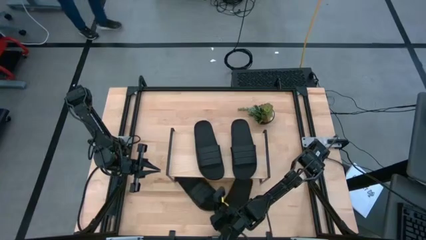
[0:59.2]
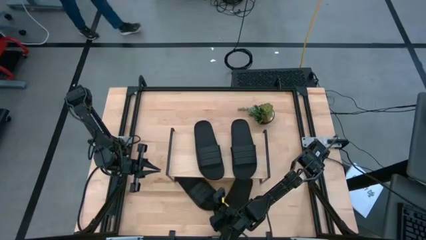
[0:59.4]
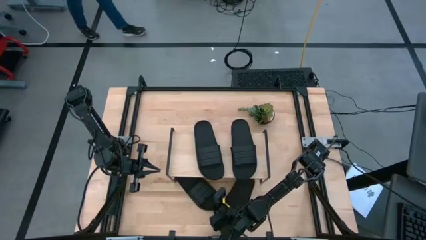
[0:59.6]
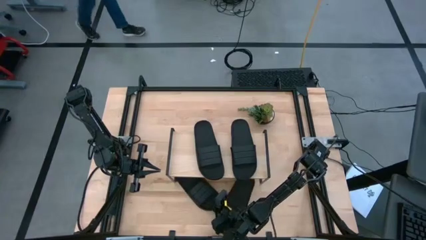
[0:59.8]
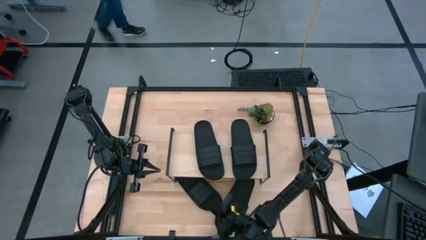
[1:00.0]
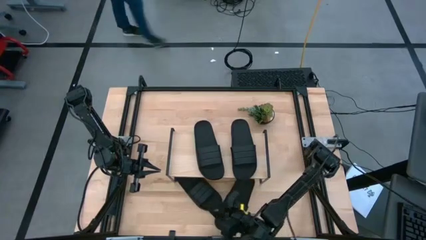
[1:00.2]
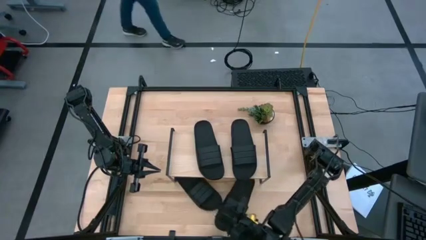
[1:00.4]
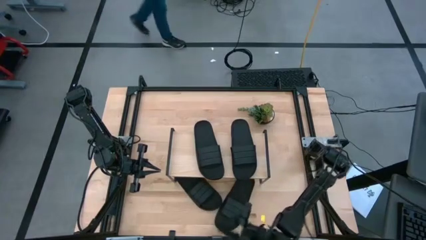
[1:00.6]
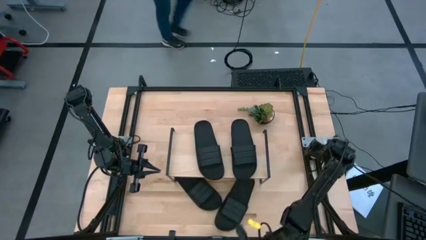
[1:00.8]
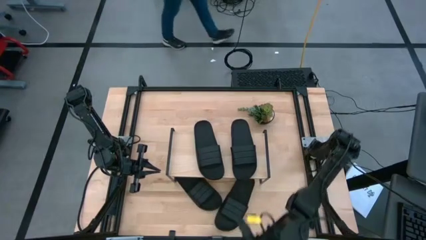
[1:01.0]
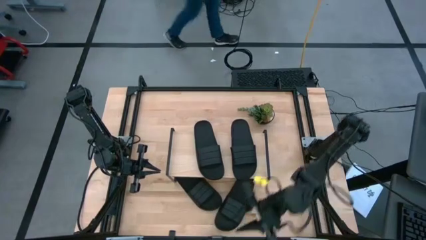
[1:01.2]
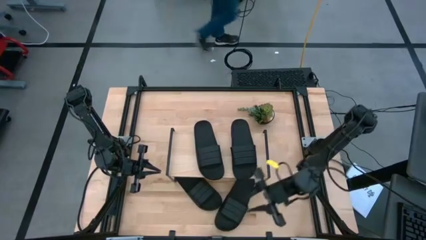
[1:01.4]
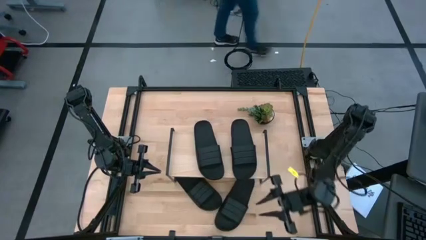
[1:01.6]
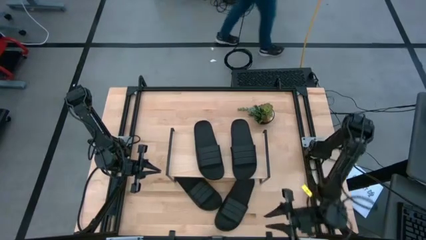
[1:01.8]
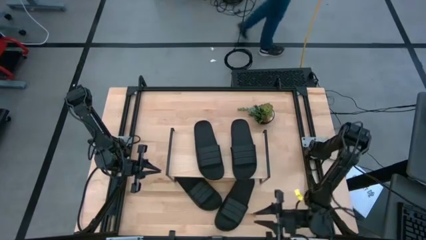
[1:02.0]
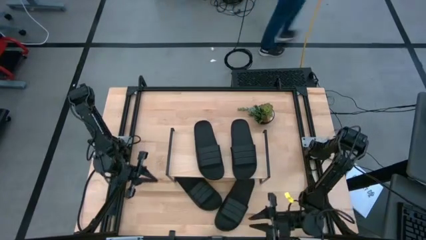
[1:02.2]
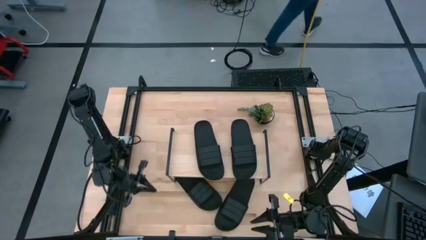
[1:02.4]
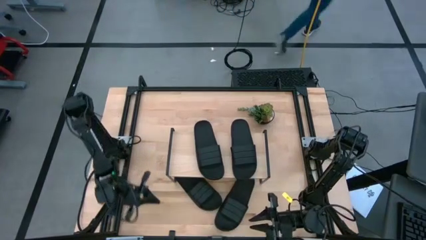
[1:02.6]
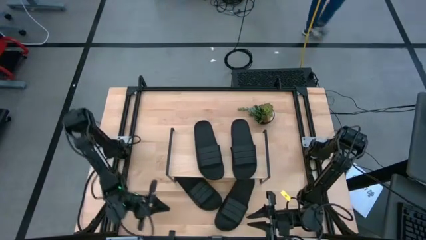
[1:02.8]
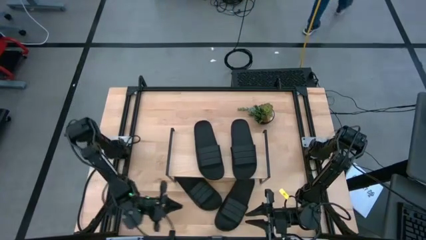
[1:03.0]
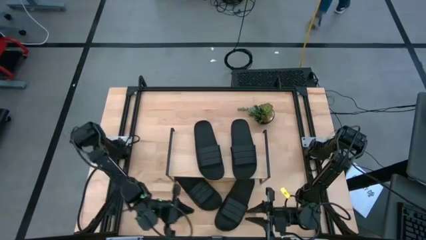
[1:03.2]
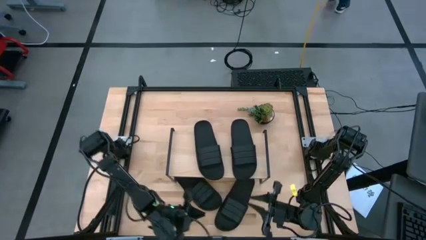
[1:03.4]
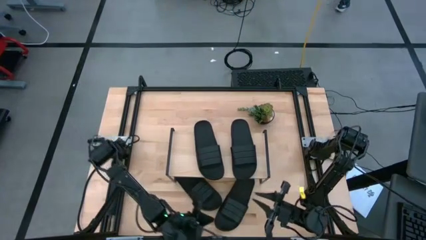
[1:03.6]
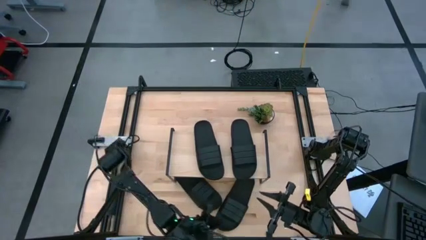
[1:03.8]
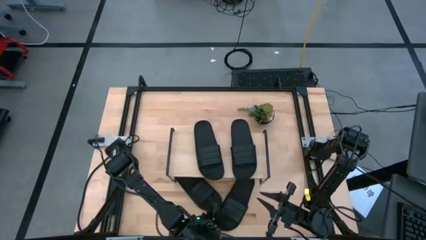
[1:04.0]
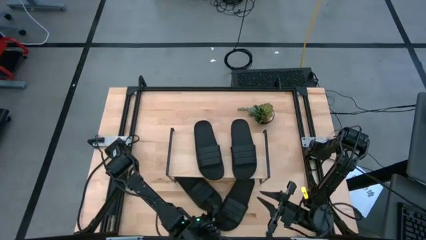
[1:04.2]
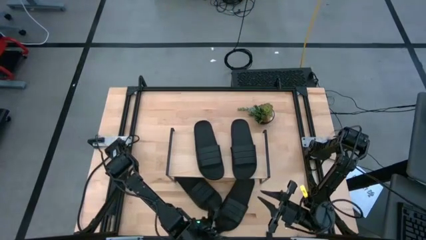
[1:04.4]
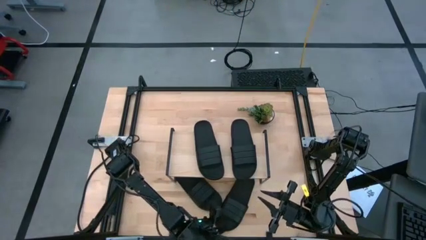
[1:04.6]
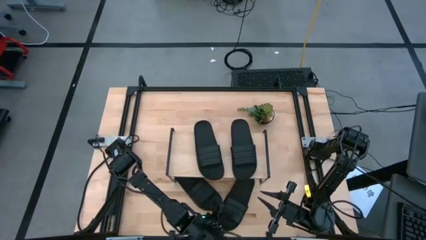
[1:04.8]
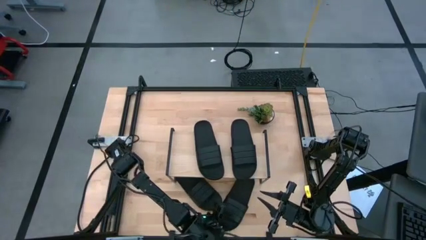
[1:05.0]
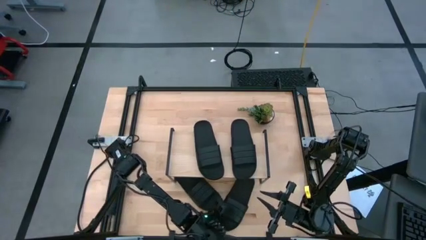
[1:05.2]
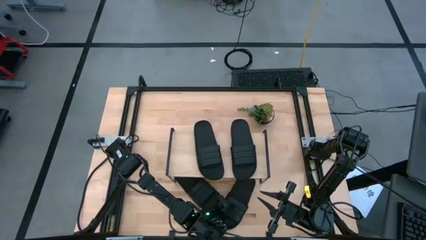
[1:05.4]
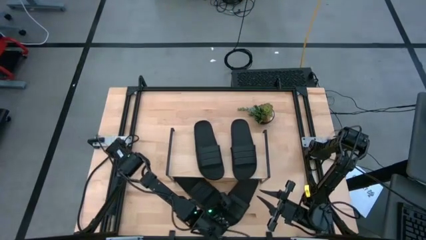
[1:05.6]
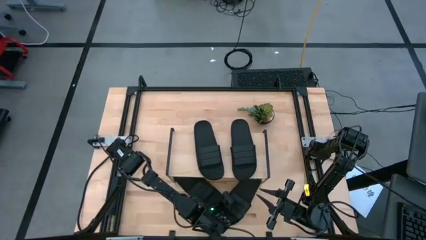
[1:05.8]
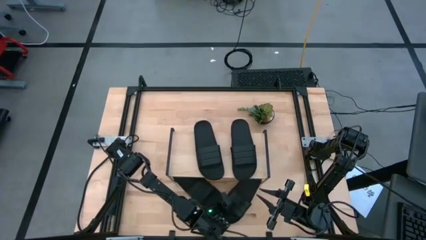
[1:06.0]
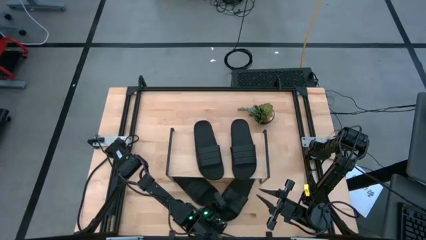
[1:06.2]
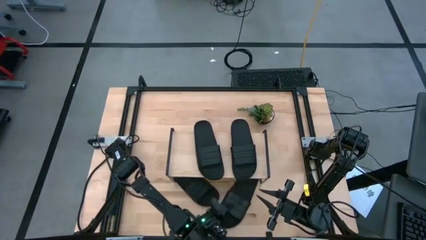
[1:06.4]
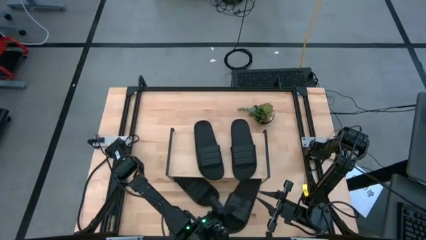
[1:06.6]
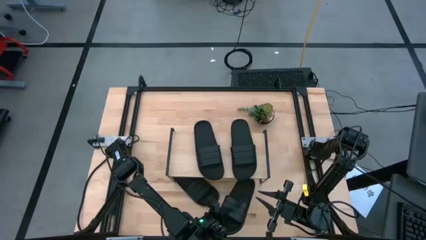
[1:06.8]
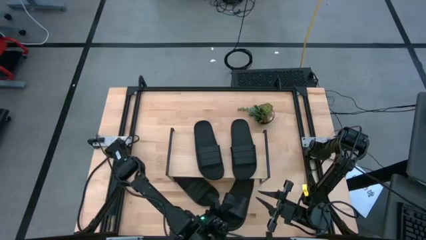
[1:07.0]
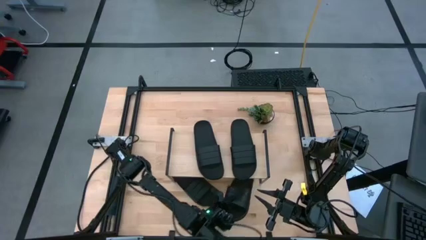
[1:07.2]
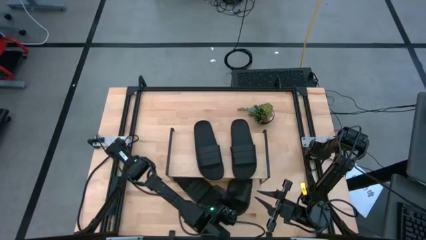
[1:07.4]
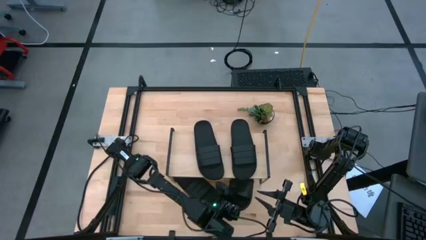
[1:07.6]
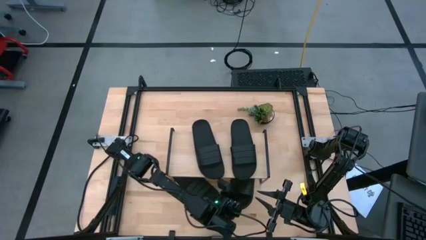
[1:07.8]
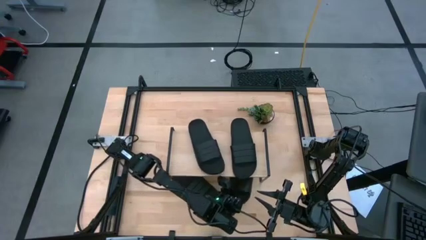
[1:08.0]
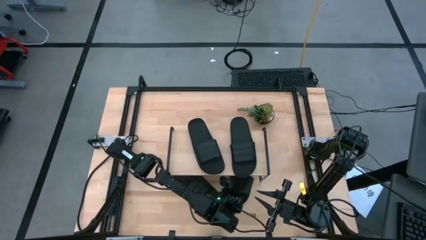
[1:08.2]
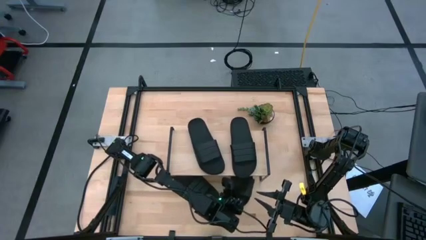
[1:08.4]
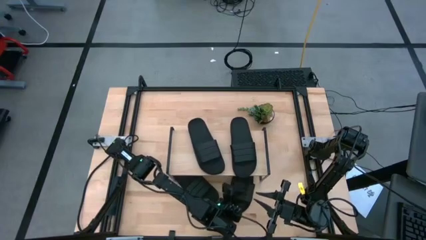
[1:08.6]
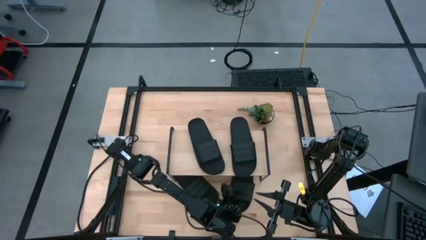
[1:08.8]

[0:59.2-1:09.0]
Task: Pick and place slides into the shelf
Put the black slide under the shelf

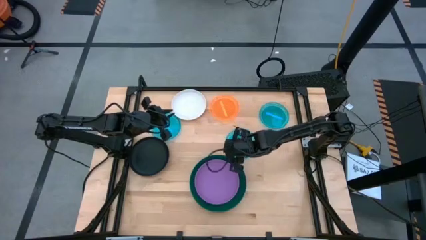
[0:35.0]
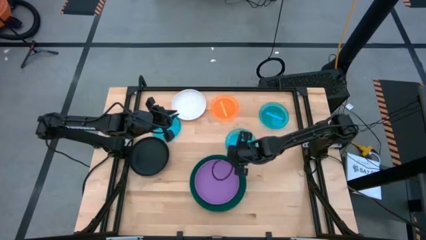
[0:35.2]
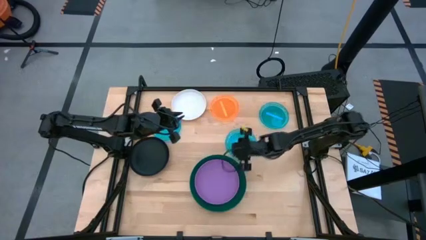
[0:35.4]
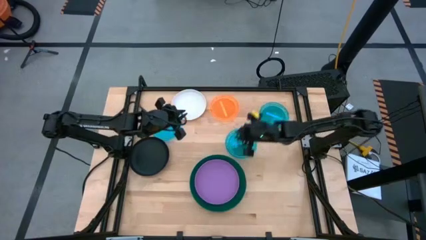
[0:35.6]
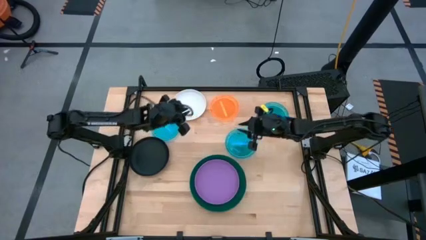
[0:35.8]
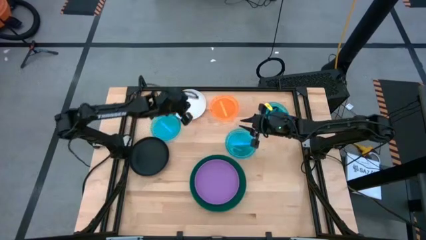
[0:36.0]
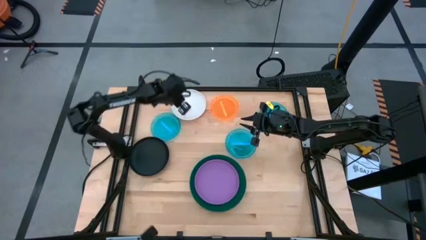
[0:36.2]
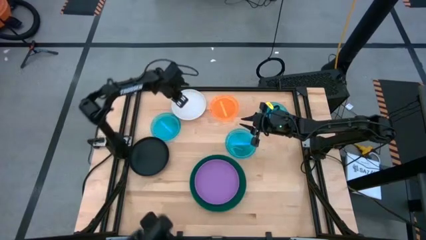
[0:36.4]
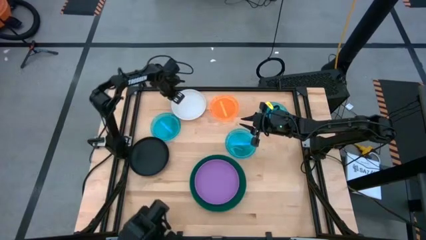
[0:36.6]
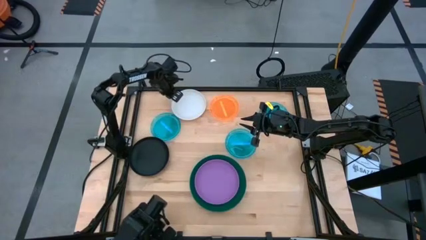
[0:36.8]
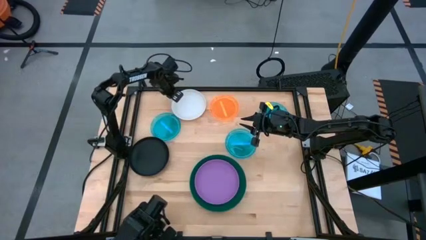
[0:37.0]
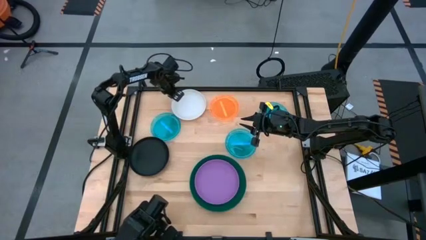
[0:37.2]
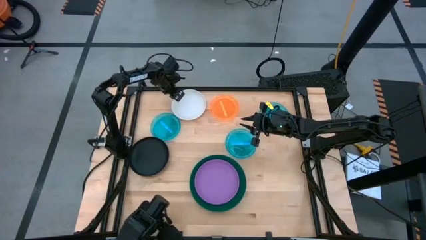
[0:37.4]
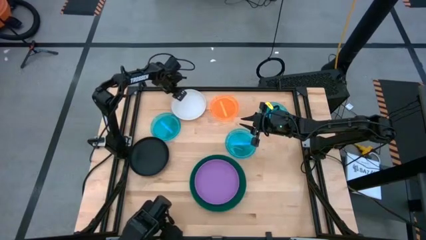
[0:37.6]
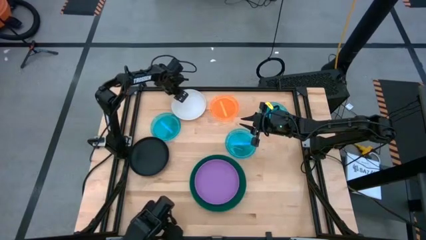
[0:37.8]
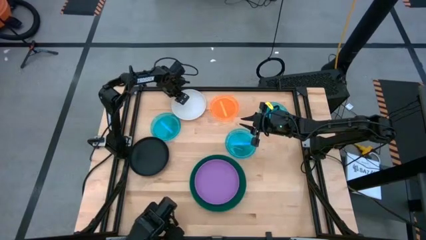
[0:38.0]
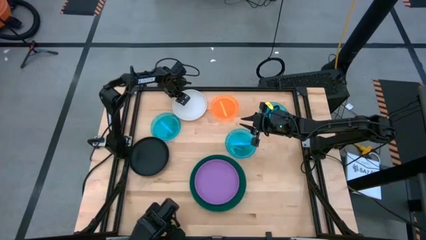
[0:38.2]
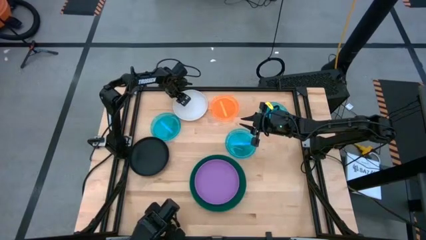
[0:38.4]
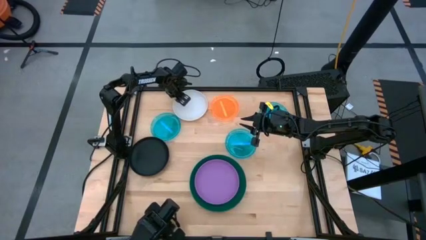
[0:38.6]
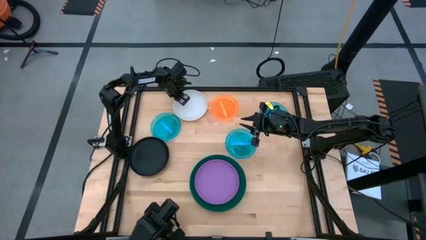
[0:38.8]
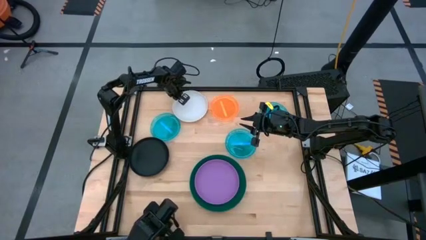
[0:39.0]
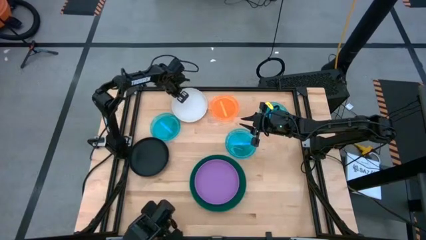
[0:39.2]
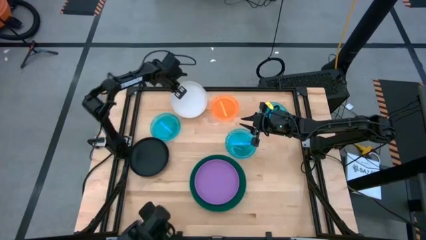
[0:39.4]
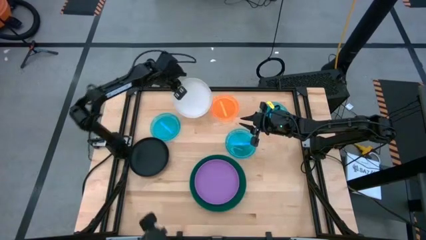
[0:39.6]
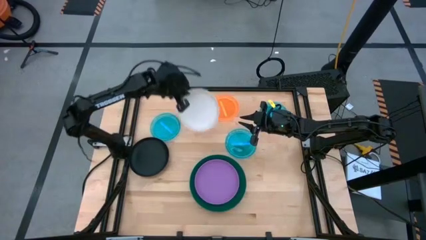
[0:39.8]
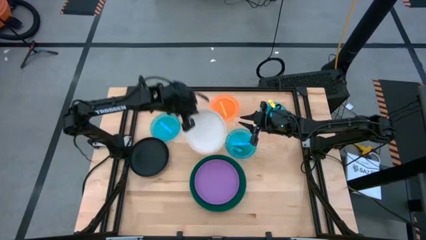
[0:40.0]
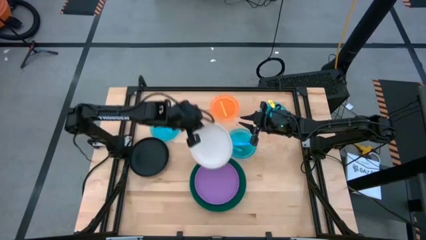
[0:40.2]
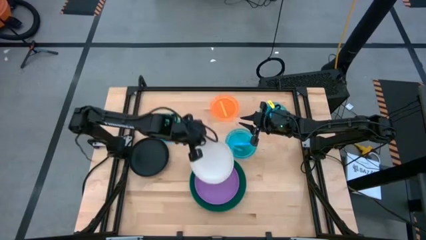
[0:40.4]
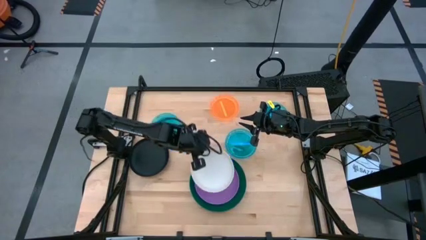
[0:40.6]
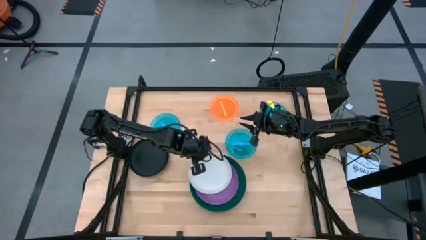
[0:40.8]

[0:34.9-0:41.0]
Task: Stack plastic plates
Stack the white plate on top of the purple plate
